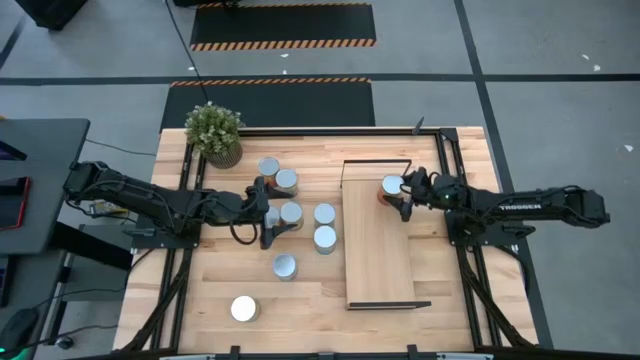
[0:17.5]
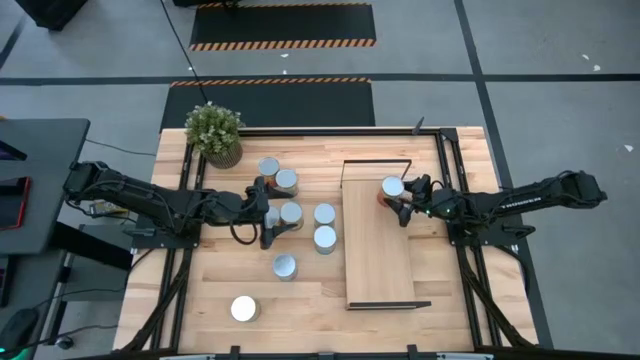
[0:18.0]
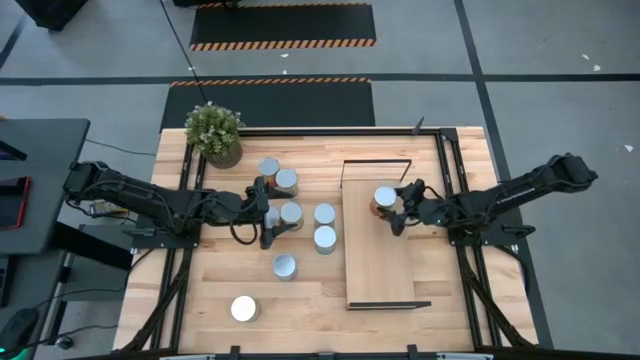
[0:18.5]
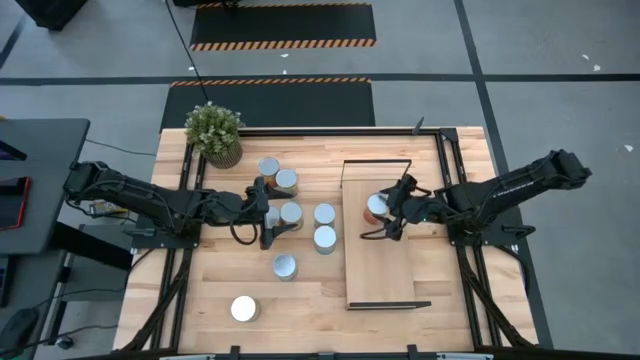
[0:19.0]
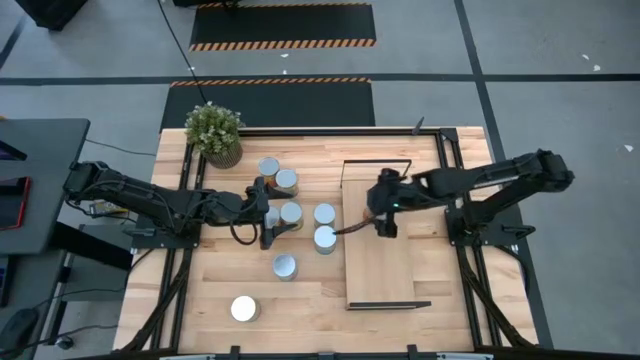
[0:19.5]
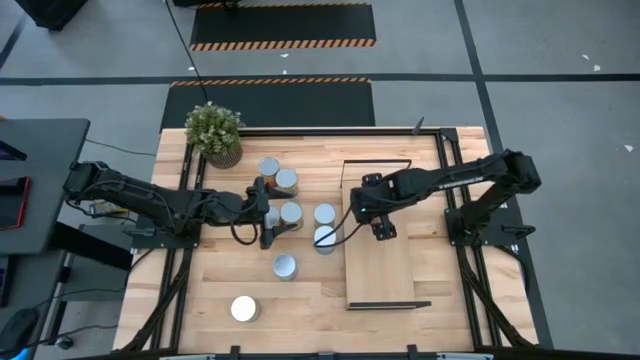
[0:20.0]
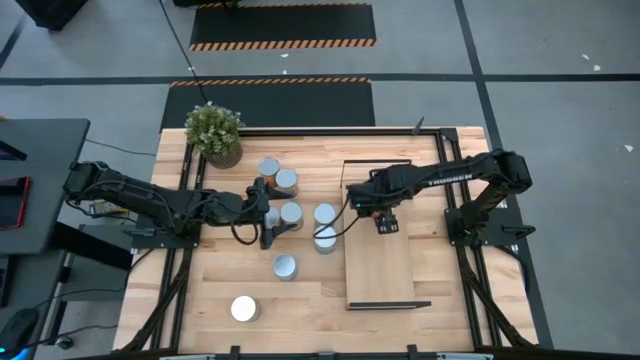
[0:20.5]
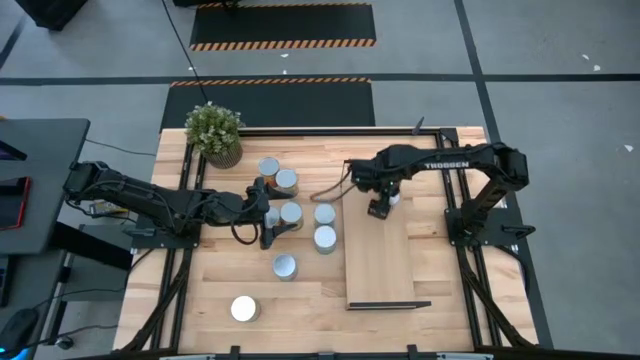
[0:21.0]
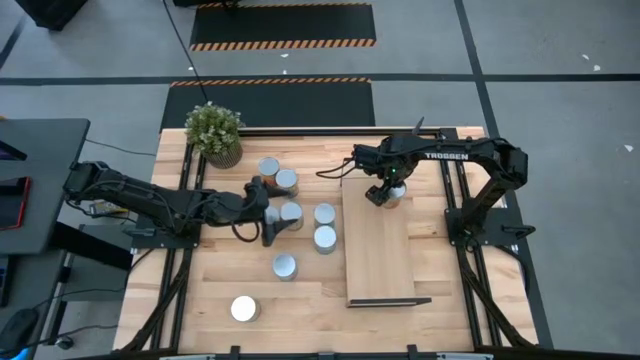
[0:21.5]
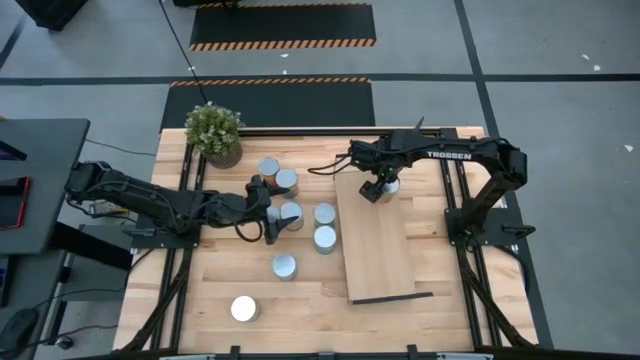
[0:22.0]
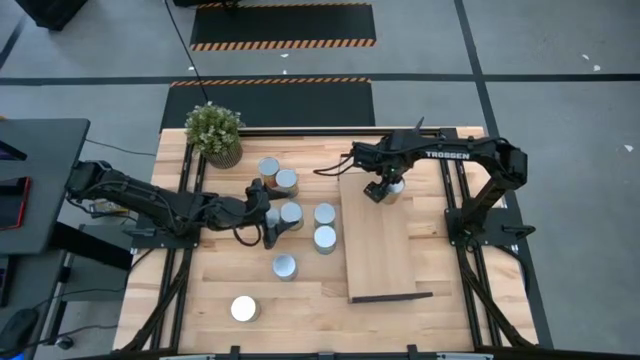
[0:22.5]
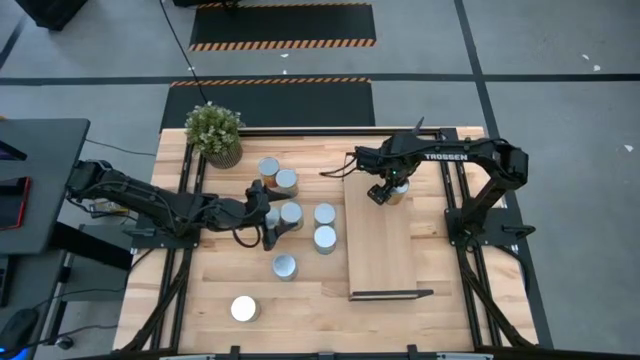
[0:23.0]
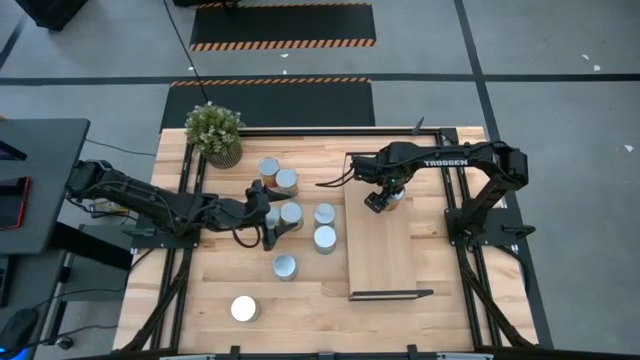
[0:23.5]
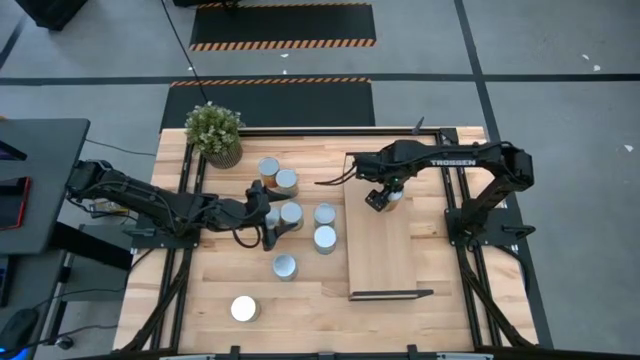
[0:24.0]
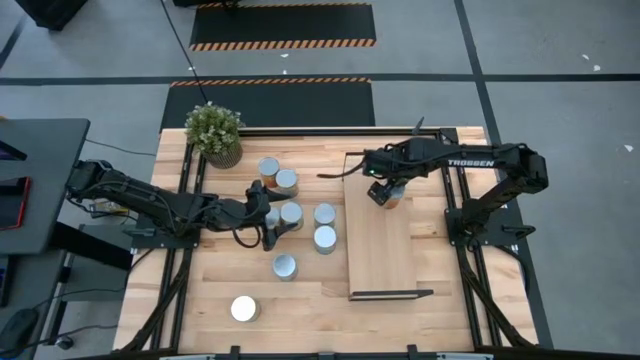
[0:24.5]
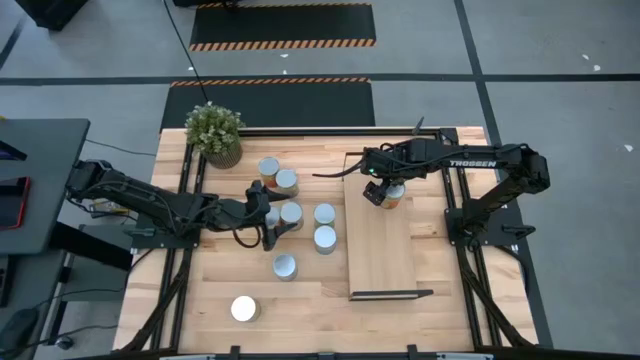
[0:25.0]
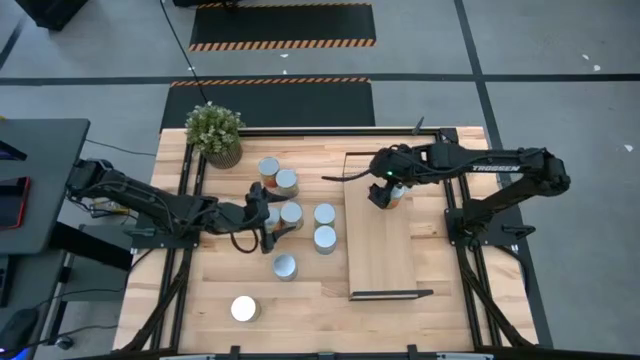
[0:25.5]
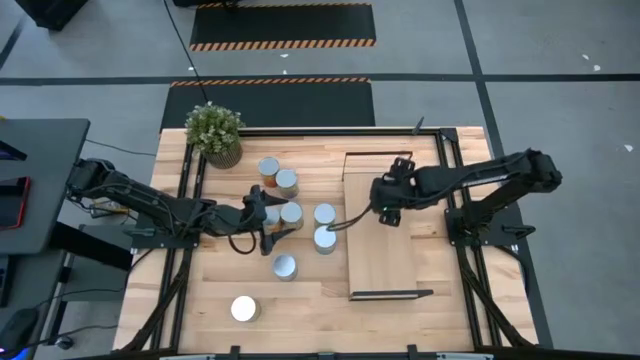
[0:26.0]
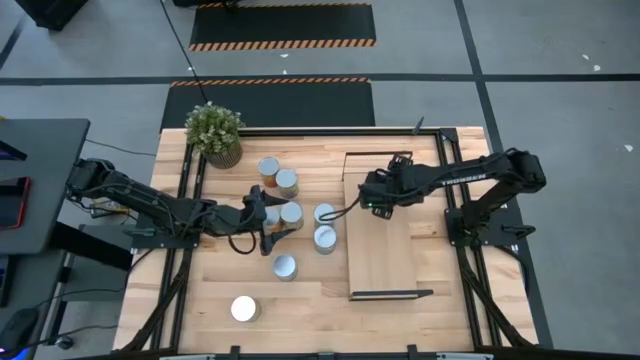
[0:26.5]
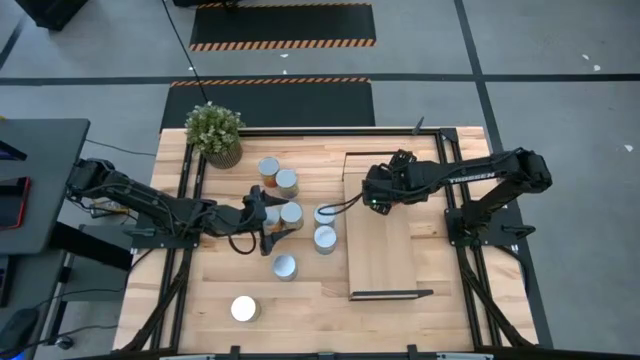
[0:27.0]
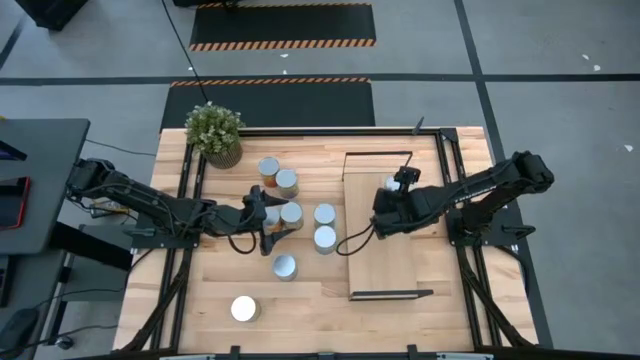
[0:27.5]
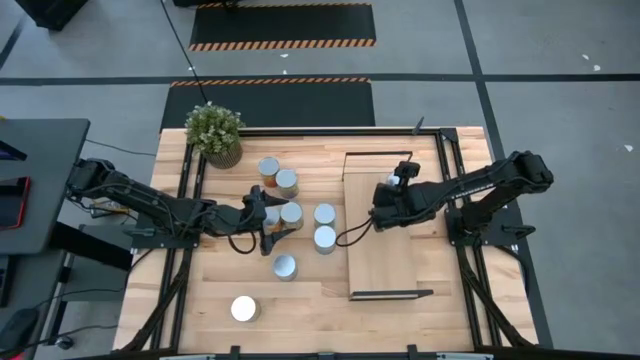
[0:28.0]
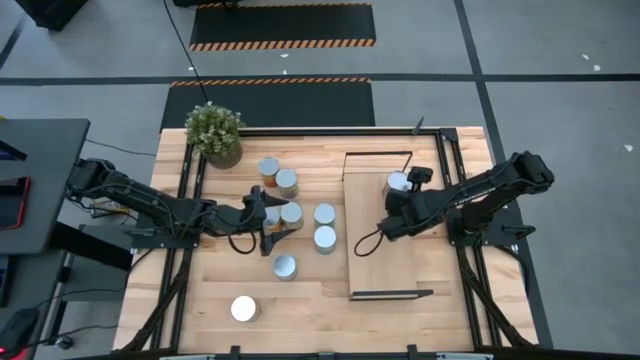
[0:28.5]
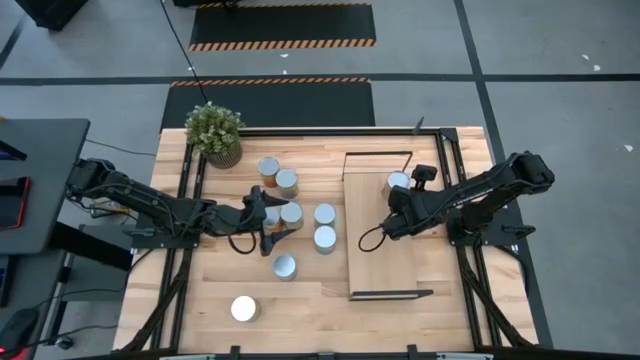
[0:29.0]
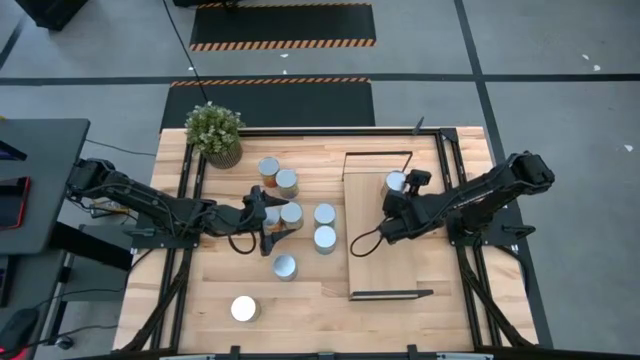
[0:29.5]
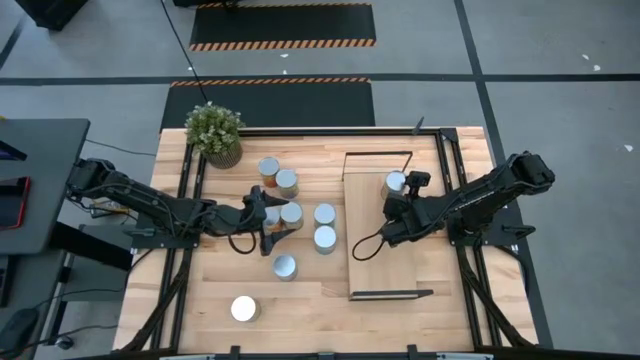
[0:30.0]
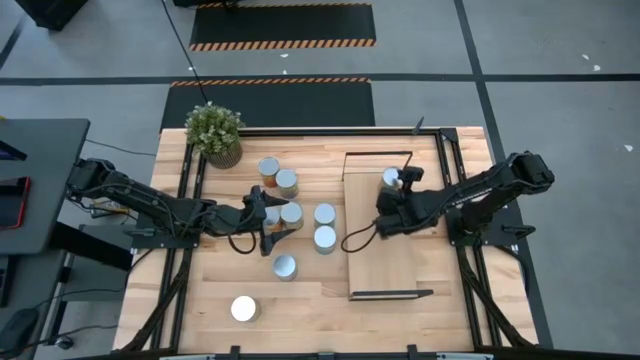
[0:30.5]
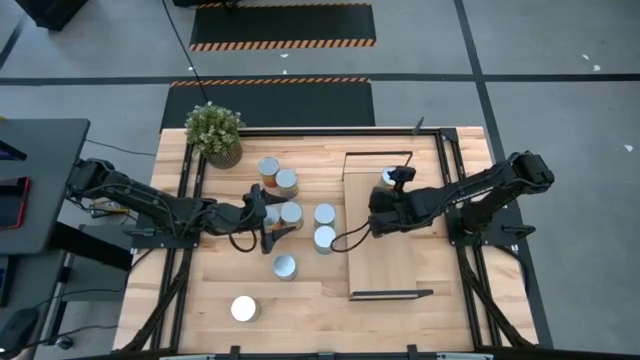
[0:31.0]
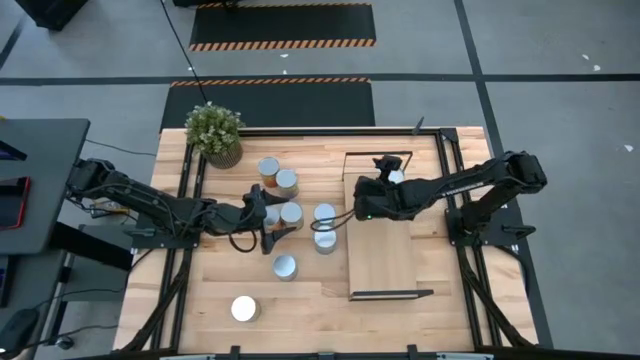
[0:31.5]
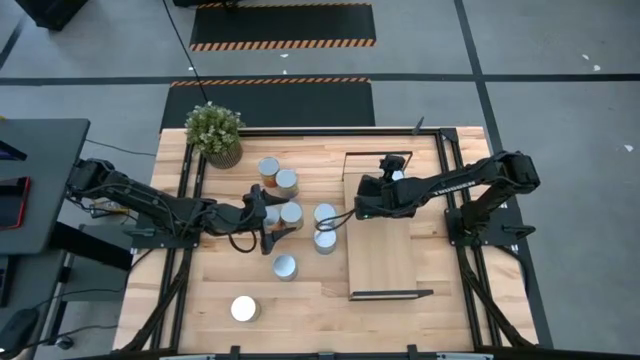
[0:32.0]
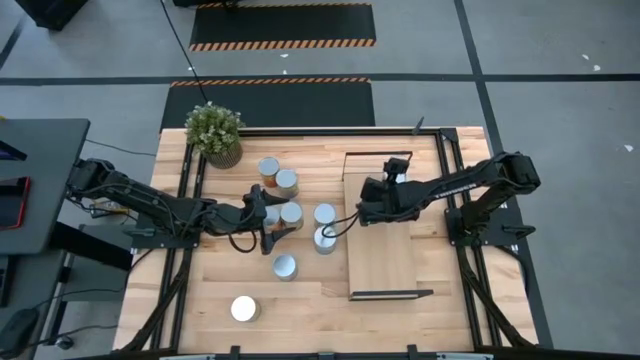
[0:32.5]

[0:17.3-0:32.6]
Task: Pick and place cans onto a shelf
Put the bottom canned pineapple on the shelf

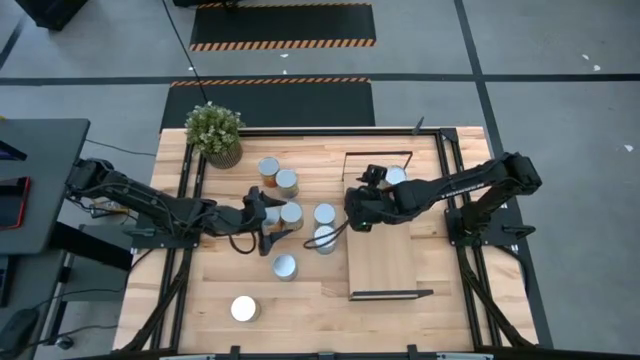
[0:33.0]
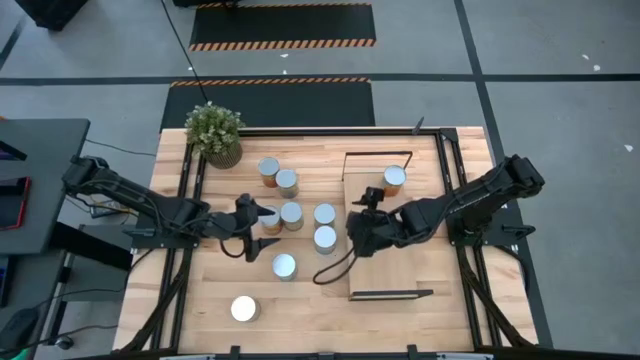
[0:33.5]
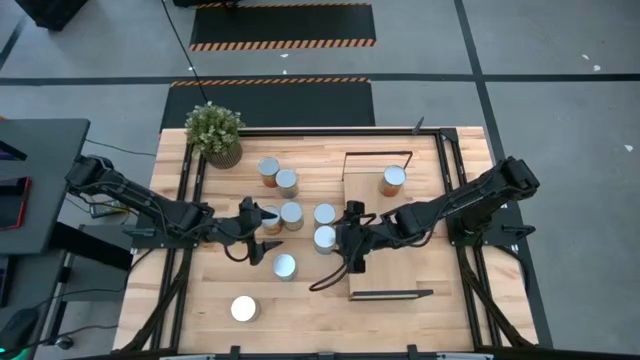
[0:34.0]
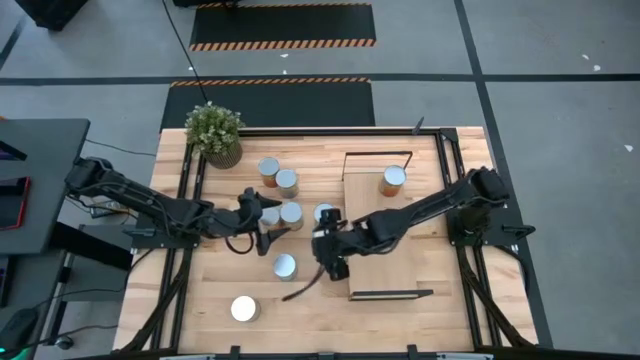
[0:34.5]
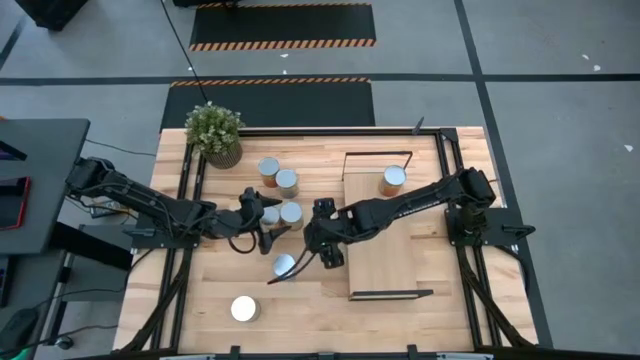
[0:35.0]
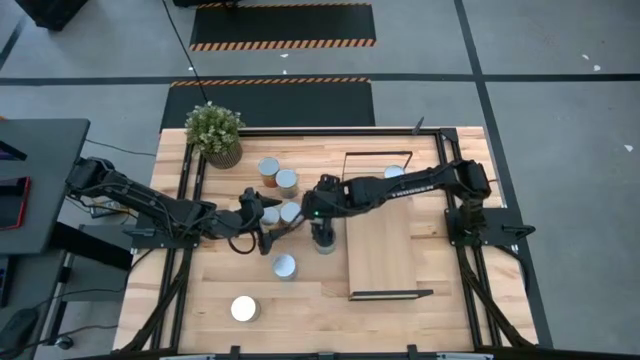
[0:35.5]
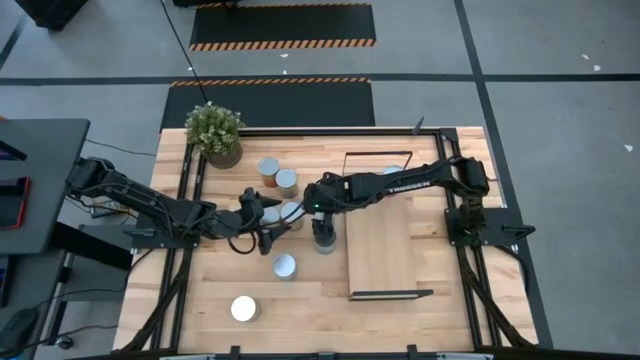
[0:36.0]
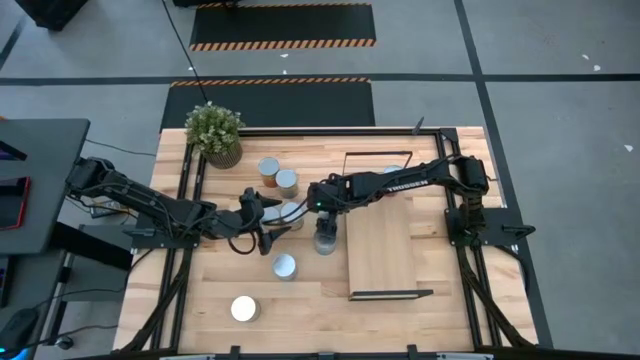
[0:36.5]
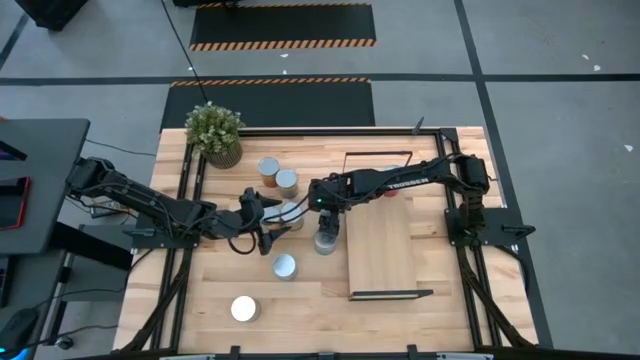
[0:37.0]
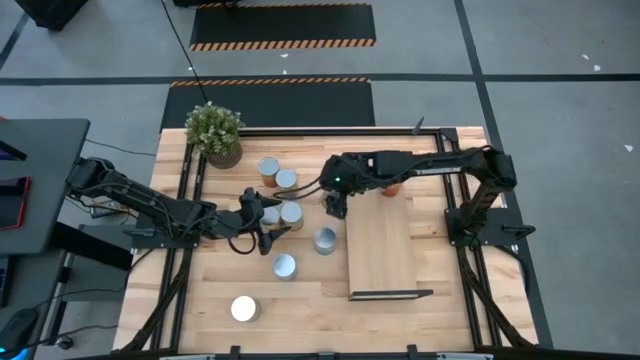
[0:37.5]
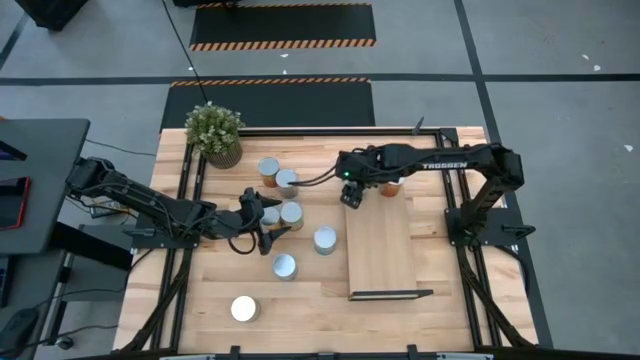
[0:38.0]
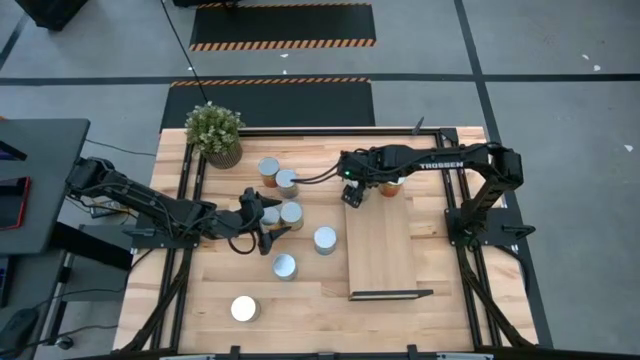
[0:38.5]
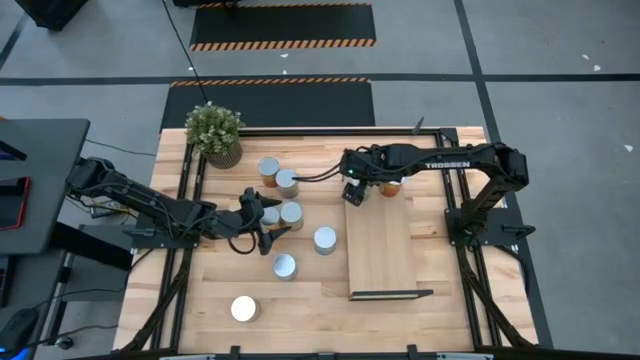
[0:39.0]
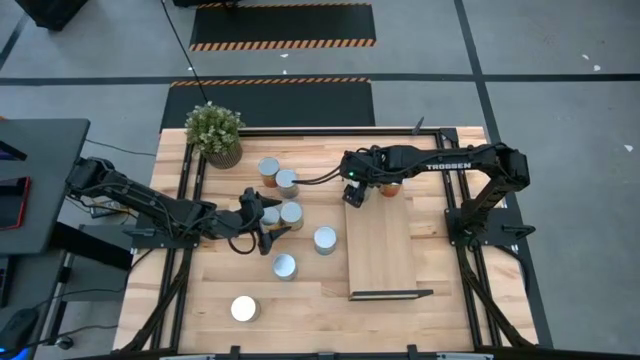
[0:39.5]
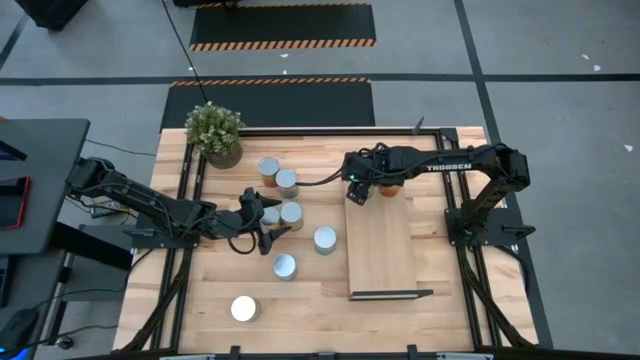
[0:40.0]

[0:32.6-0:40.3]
Put the canned pears on the shelf
